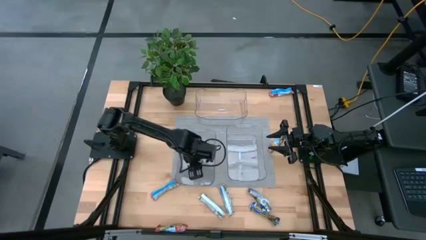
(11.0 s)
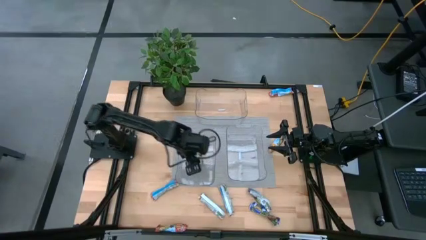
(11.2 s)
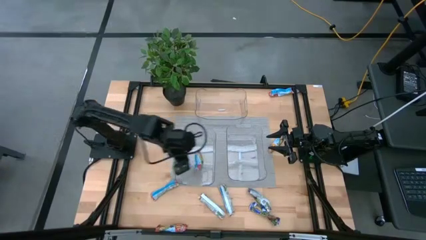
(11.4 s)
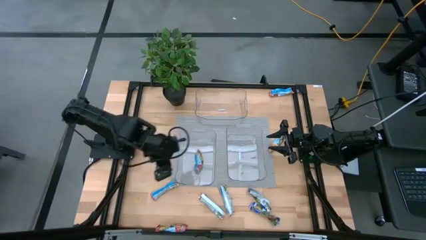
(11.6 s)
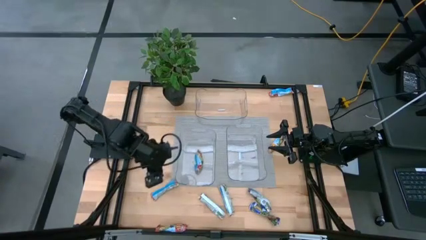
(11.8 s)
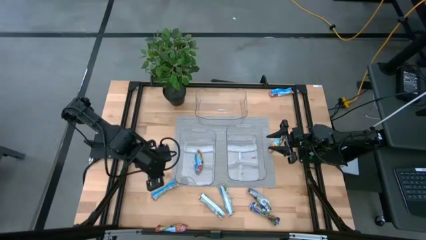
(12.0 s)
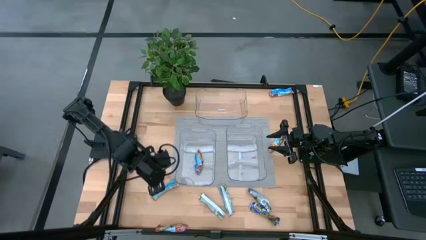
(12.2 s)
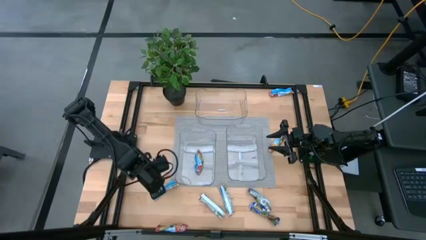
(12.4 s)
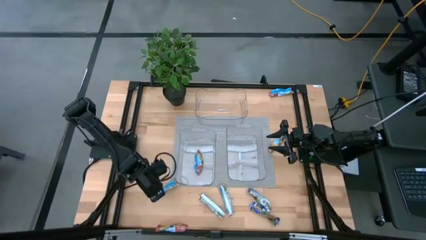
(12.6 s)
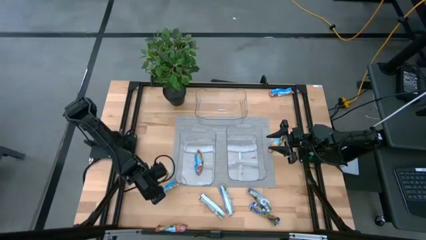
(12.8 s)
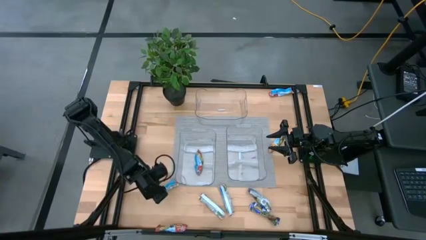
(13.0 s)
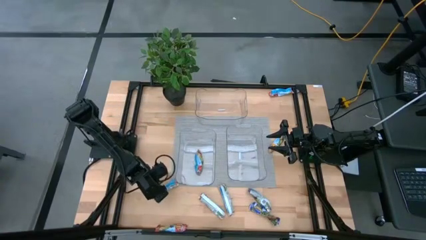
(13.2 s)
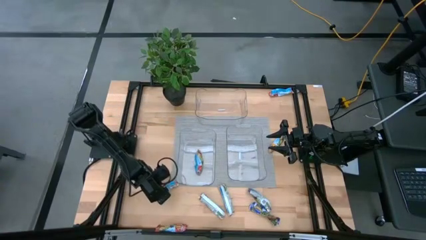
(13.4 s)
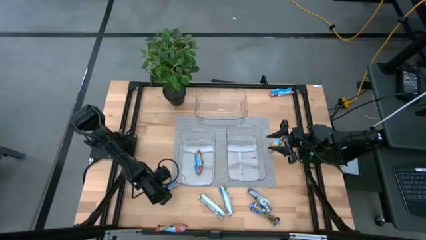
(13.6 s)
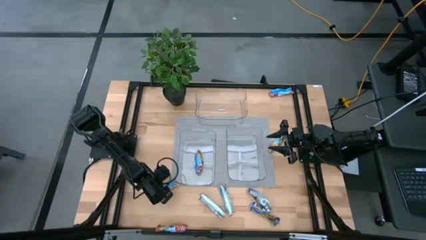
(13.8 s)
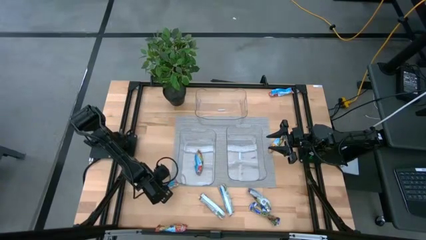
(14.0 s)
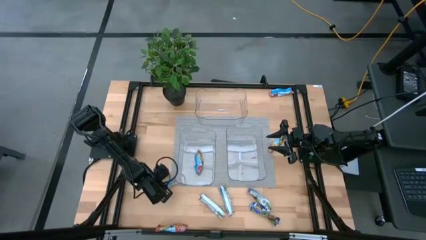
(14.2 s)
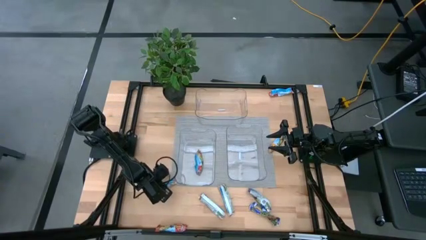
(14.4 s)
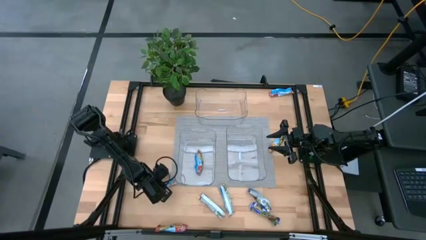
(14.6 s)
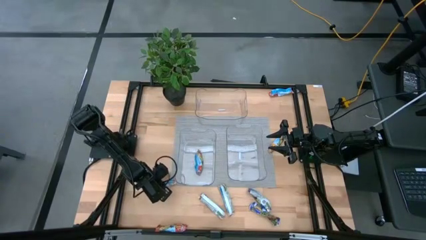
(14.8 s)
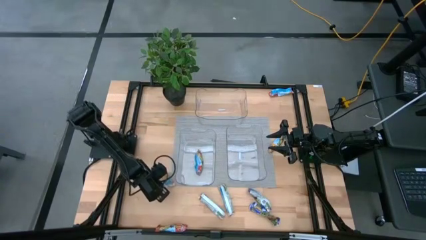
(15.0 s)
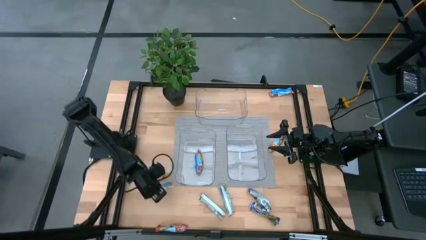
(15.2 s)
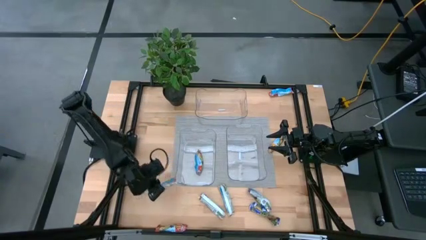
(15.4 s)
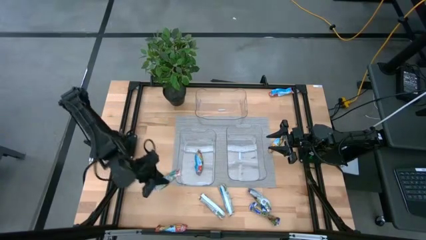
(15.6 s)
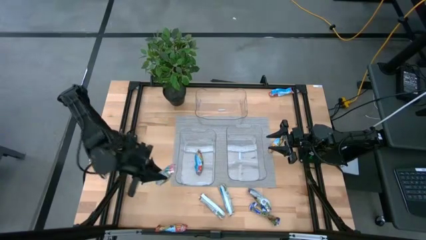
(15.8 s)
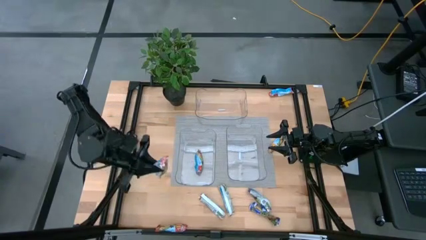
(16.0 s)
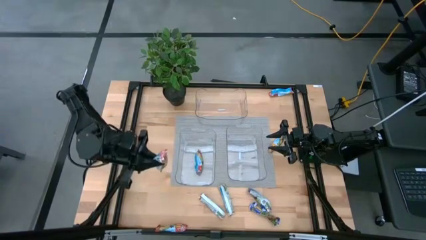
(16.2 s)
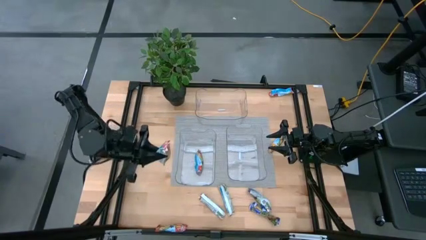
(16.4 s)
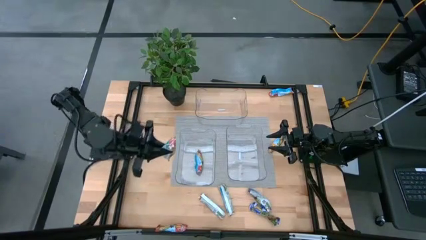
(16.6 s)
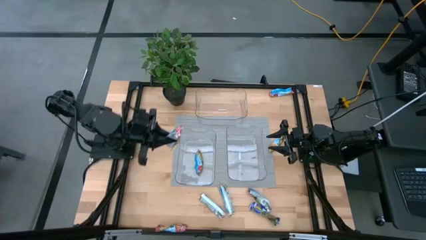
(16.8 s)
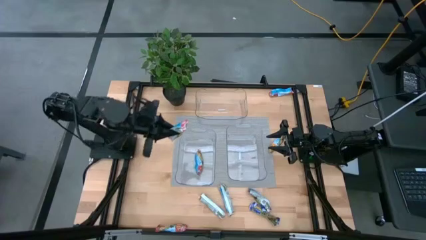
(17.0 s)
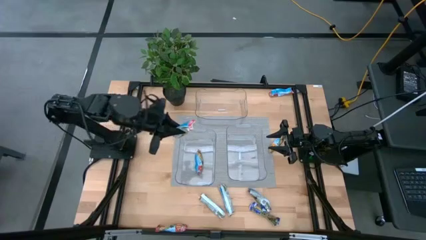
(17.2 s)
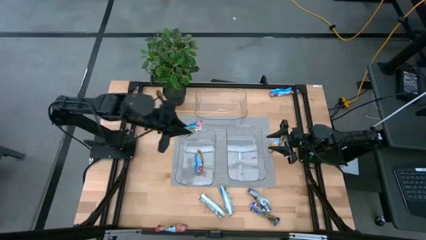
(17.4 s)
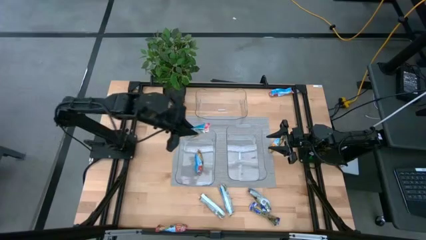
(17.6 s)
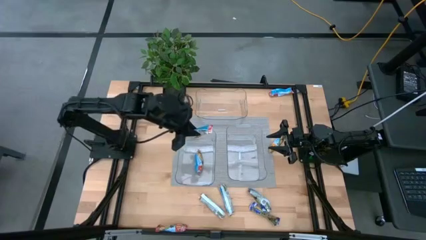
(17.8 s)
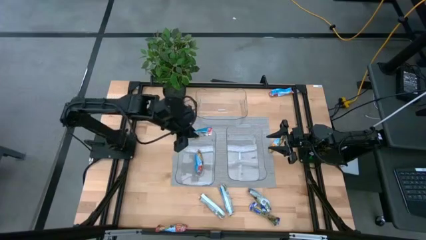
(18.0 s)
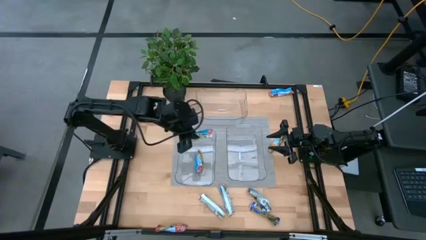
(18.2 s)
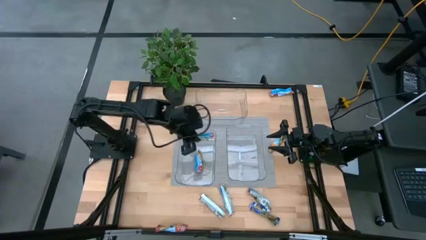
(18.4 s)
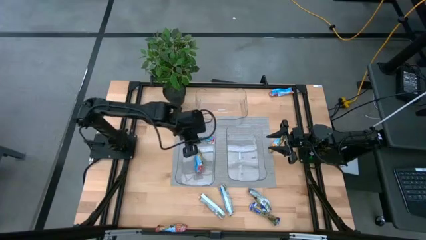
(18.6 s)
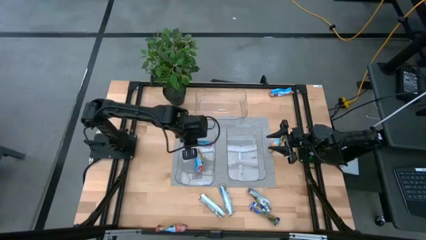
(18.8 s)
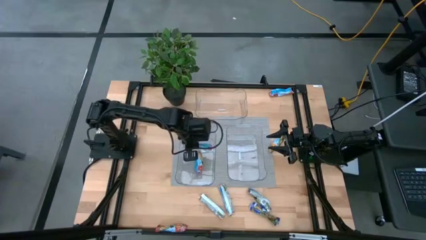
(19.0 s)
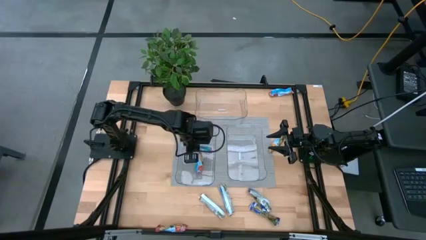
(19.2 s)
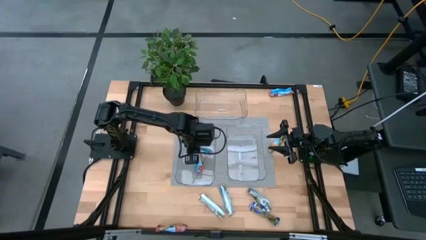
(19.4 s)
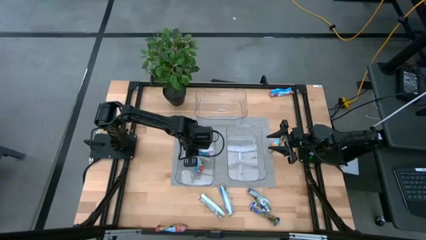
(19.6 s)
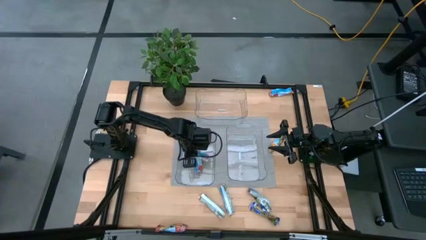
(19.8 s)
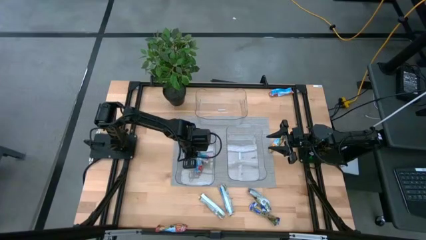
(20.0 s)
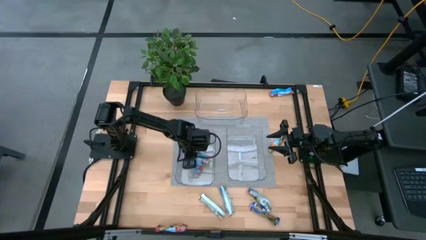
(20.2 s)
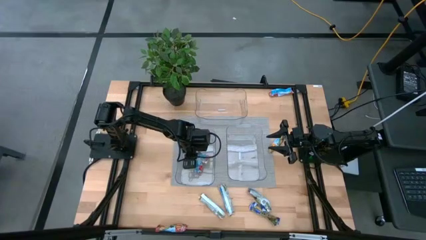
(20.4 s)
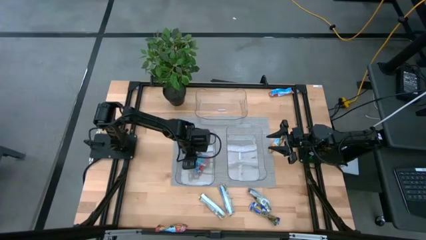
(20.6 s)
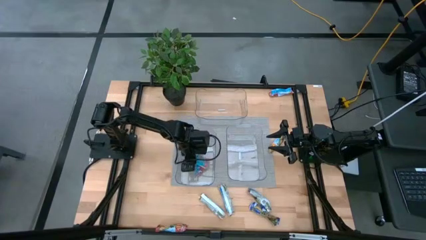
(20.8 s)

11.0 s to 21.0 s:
Task: Pick and place Granola Bars by type
Put the red granola bar into the bottom left transparent bin

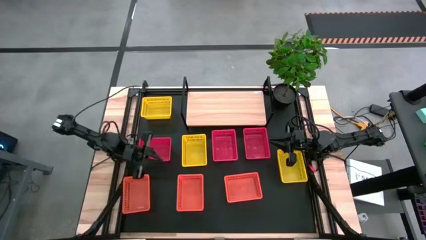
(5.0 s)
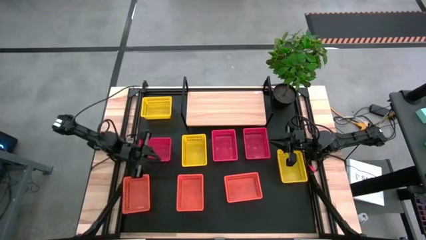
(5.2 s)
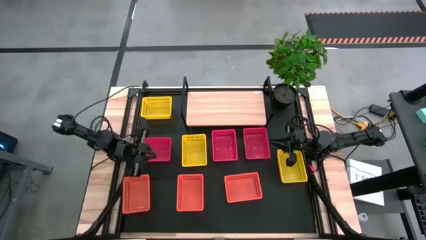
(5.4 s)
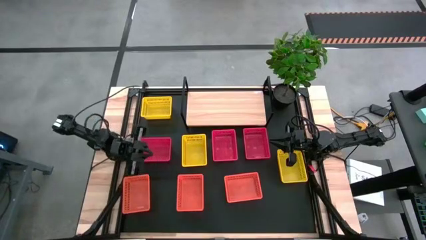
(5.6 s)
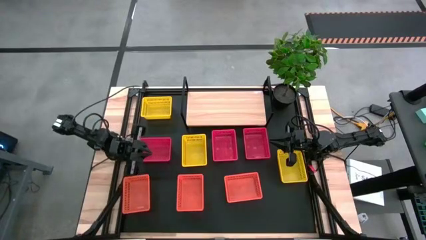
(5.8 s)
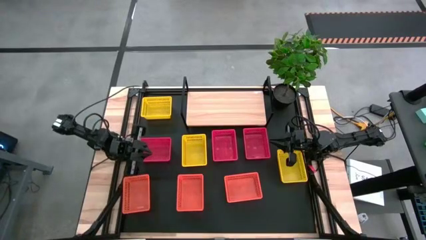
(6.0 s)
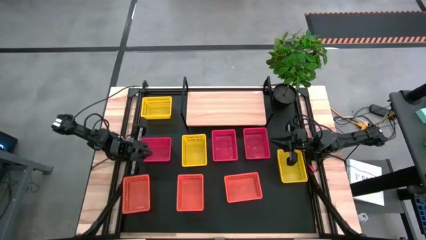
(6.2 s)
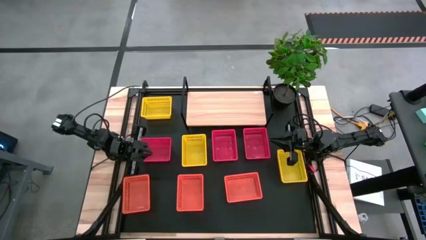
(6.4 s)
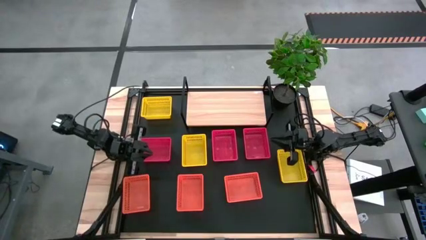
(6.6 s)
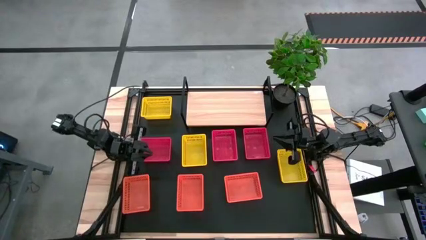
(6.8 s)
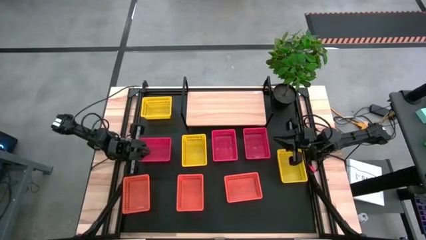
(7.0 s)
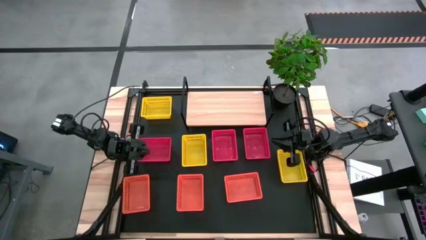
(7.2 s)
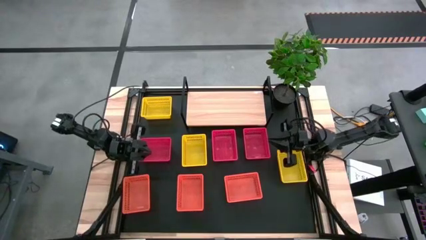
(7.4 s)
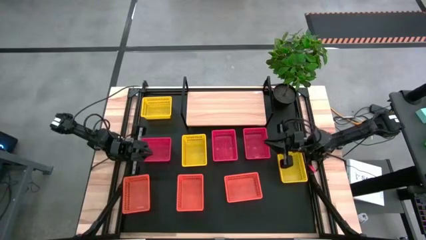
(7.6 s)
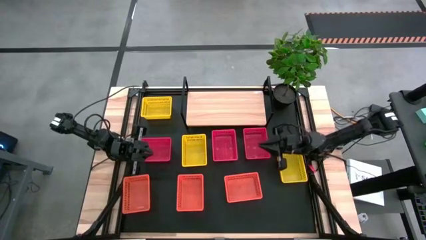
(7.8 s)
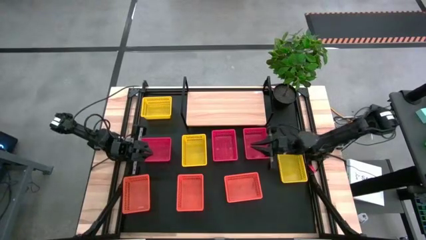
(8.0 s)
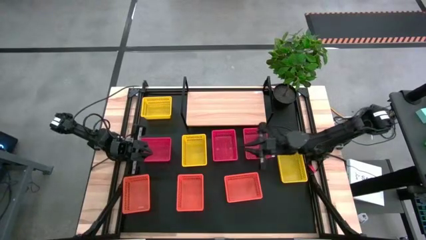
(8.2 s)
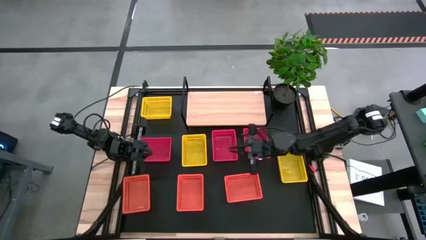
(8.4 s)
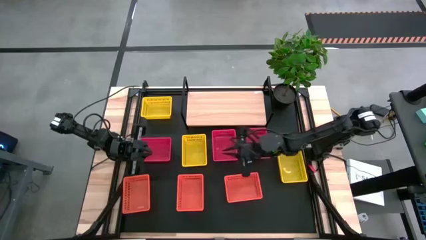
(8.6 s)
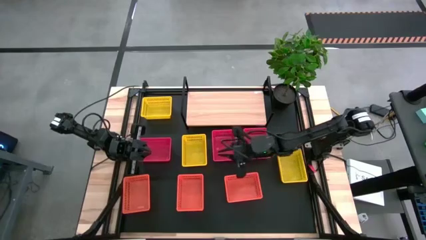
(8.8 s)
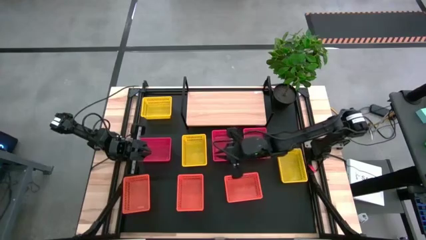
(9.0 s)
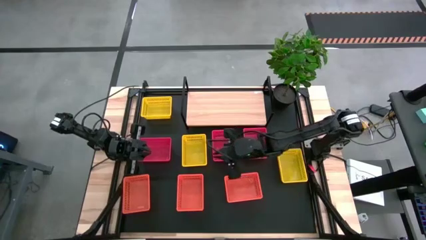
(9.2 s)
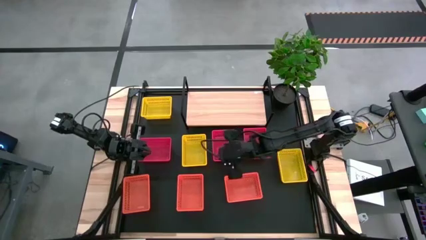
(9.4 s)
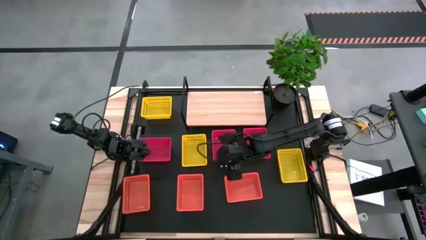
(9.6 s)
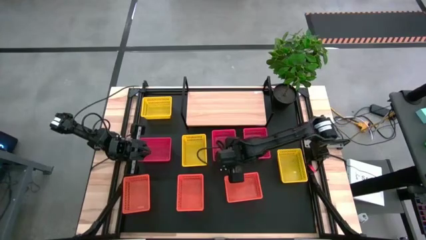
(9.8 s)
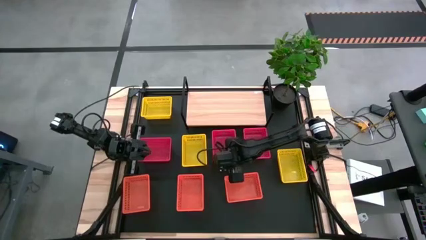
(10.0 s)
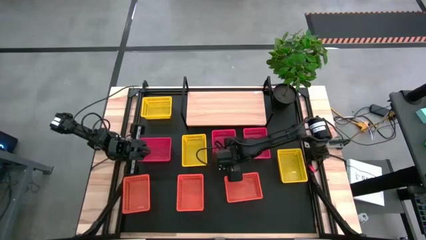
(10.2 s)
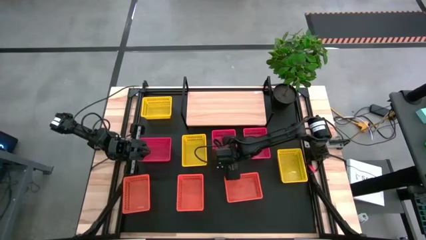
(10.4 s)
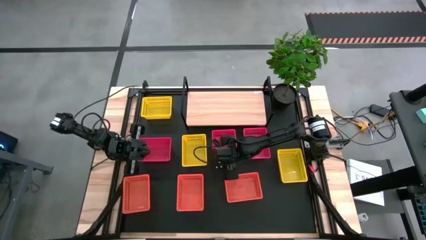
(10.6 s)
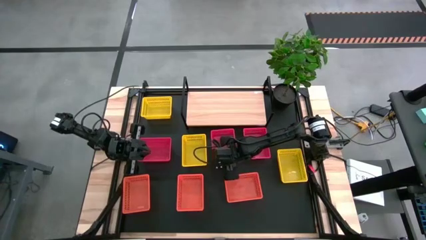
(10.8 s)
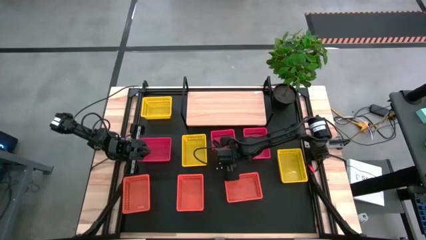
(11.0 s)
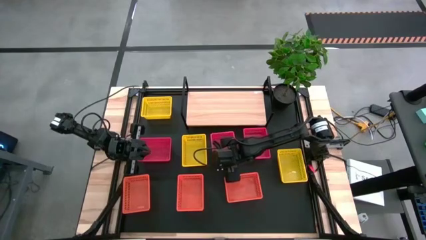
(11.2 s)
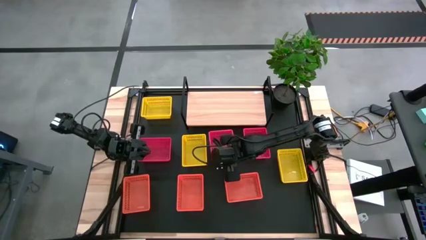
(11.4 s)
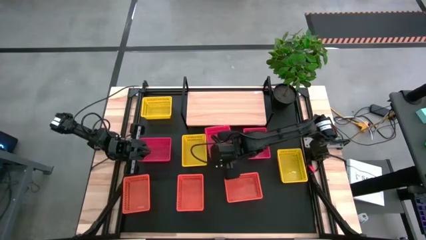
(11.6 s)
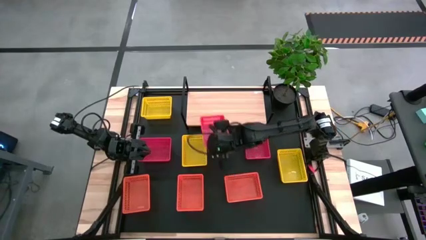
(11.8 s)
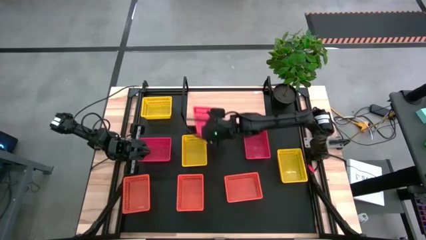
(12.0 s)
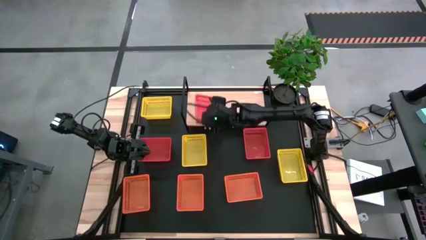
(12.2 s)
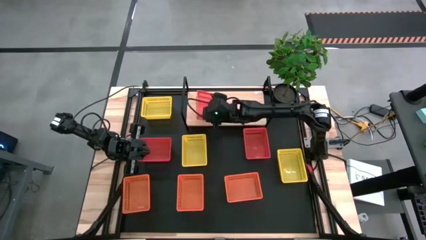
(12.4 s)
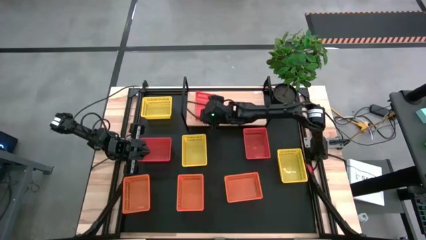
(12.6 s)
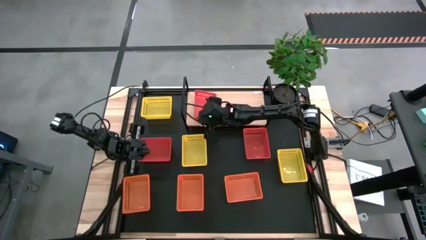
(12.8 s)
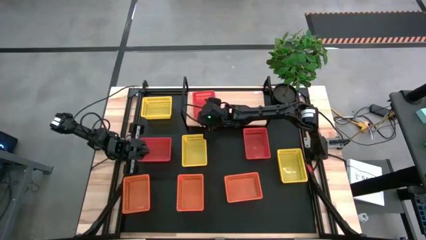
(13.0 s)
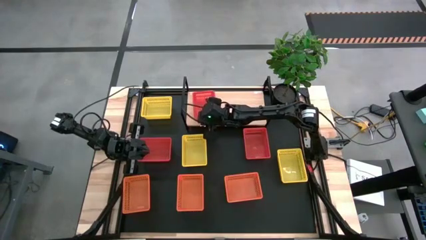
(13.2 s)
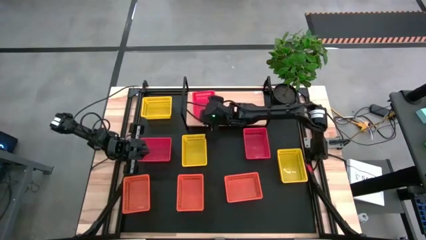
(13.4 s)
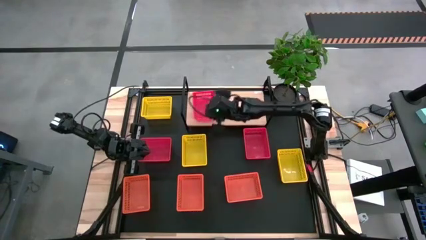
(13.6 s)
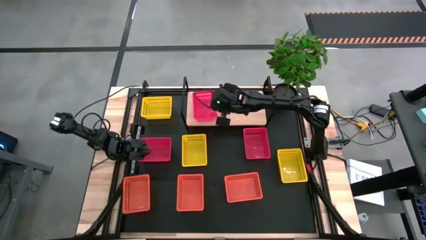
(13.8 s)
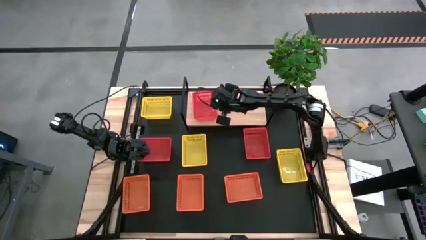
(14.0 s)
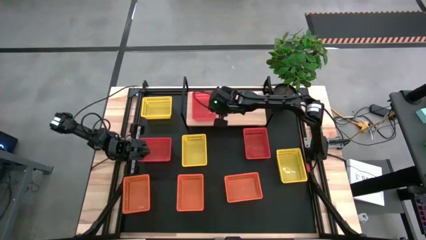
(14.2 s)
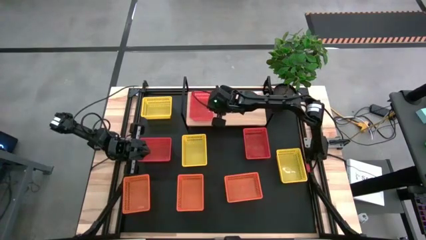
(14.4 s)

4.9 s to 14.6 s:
Task: Stack baskets on shelf by color
Put the middle red bin on the shelf
